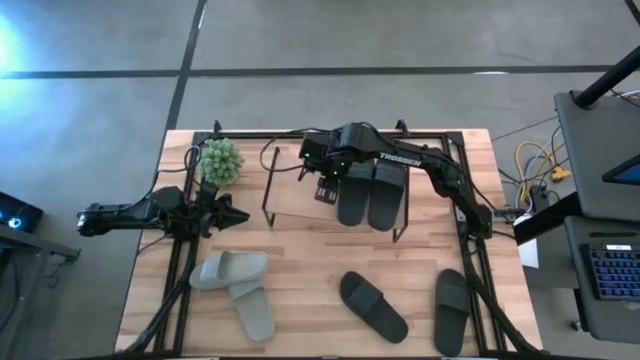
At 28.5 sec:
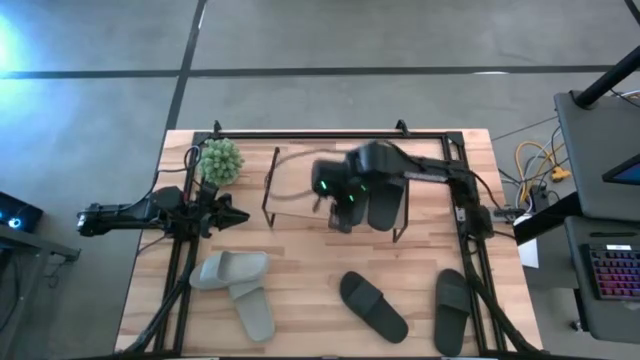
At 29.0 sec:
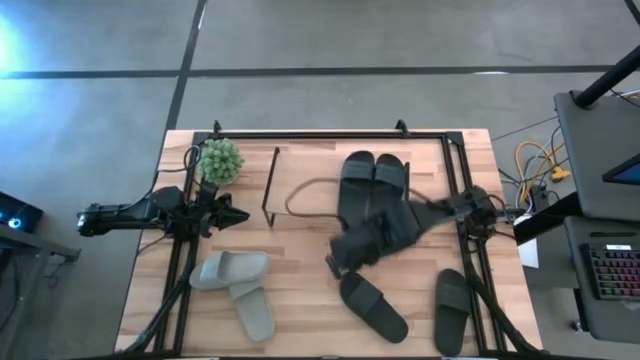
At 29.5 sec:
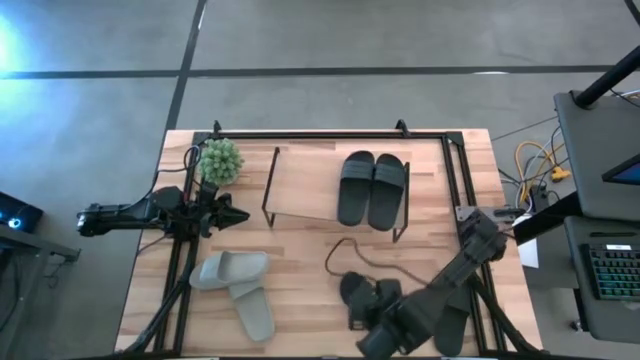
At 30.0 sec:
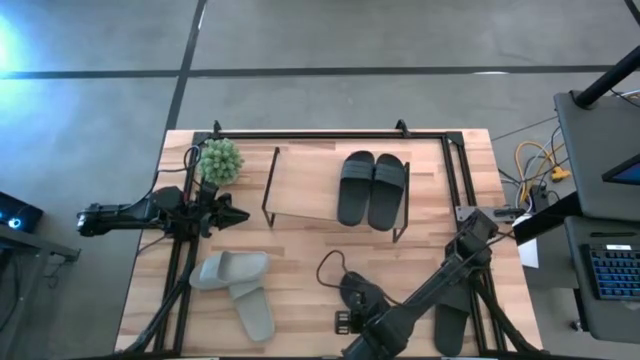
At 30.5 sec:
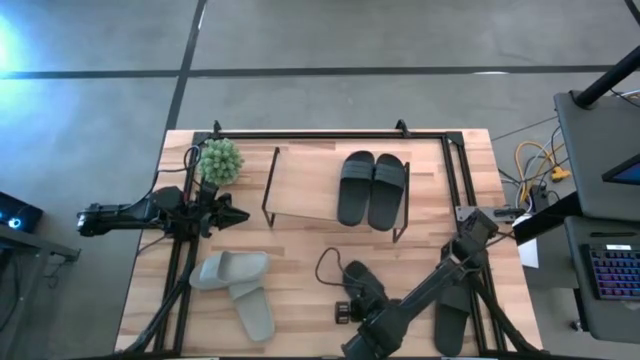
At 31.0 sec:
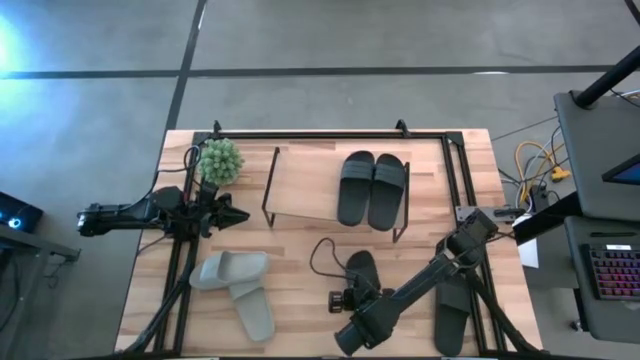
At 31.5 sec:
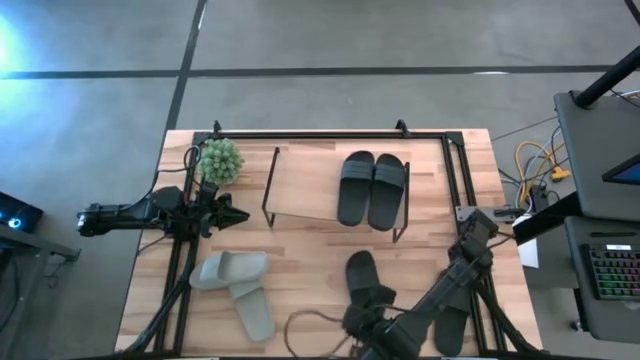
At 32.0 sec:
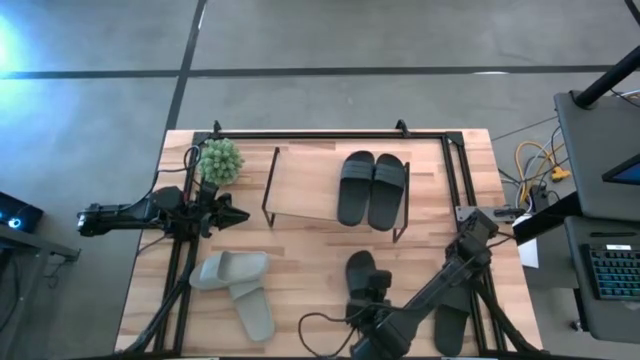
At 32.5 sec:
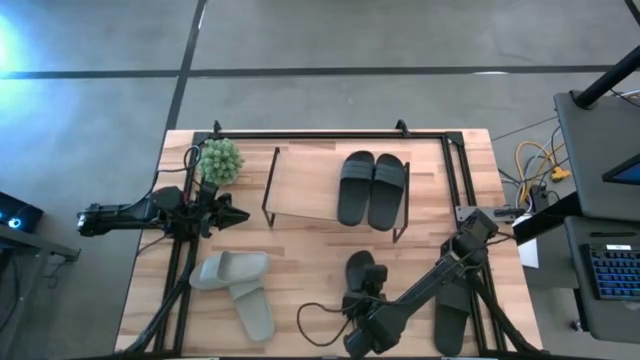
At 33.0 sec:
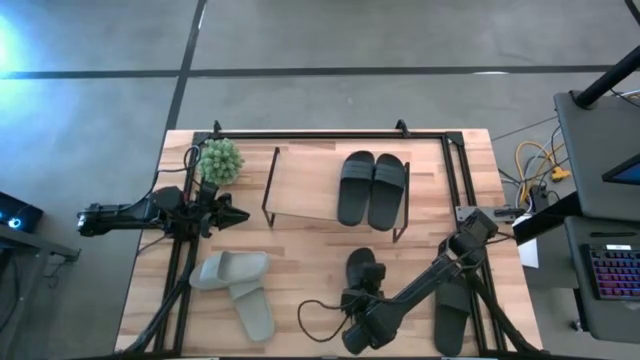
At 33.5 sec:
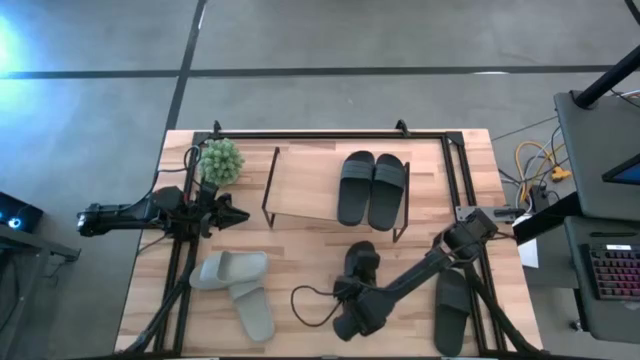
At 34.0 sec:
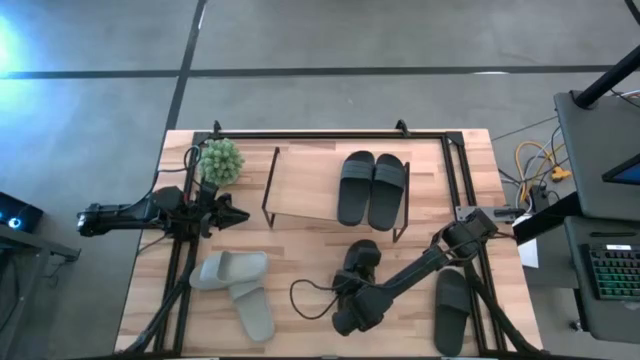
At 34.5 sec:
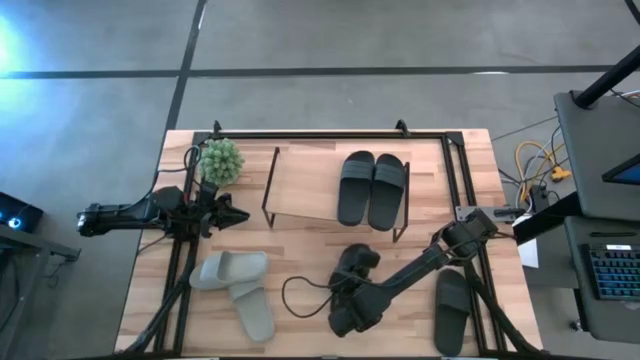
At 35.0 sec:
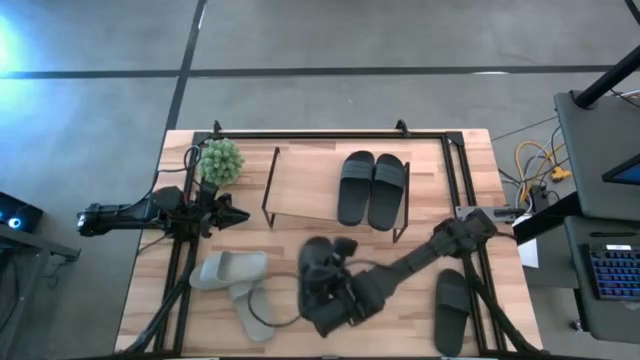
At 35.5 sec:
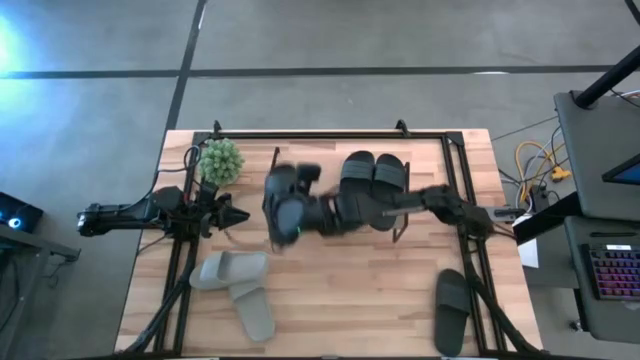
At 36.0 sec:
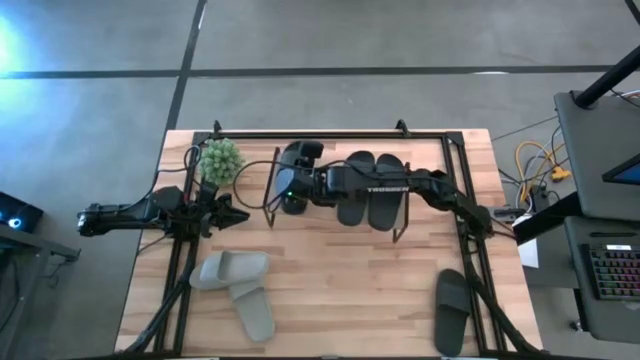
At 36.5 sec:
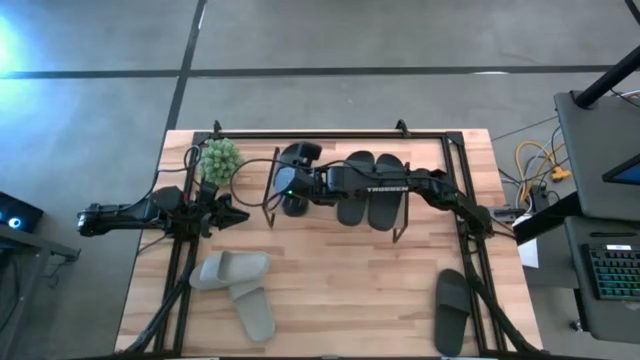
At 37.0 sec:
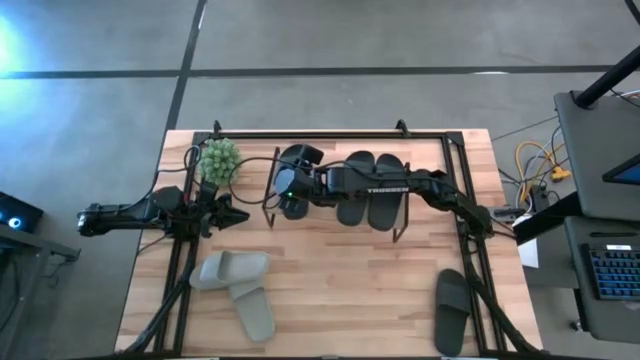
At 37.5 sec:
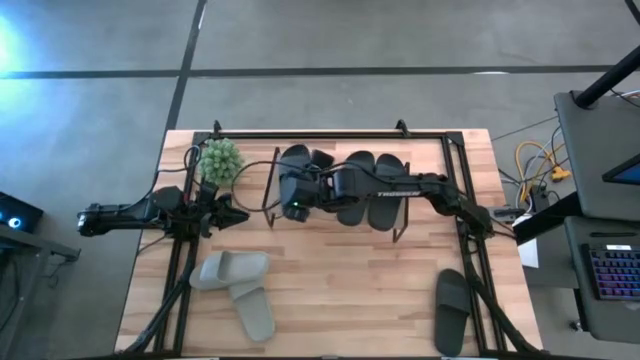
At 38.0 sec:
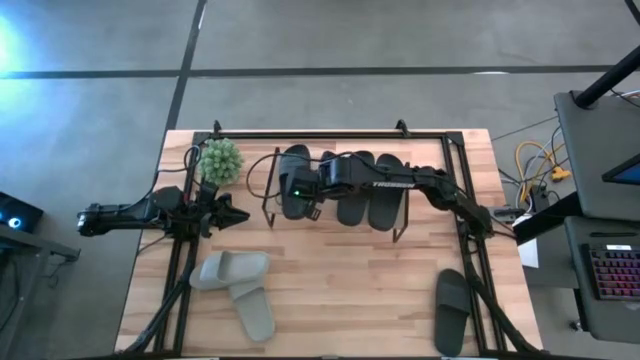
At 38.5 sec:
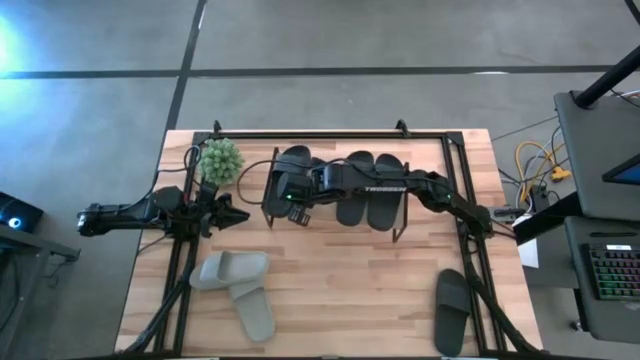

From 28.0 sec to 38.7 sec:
Task: Pick and place slides into the shelf
Put the black slipper on the shelf

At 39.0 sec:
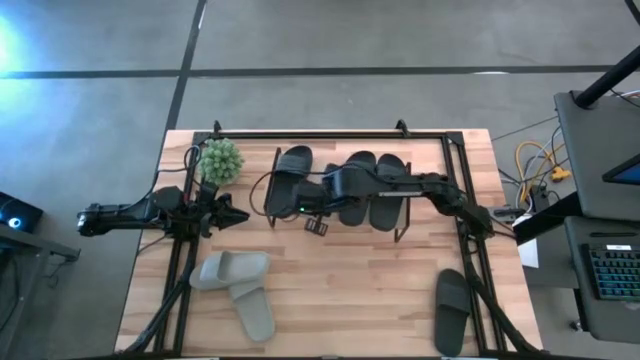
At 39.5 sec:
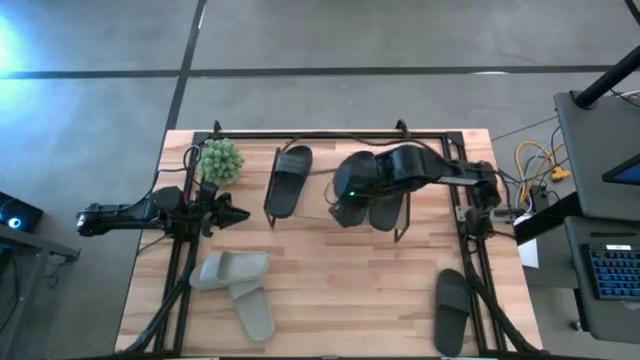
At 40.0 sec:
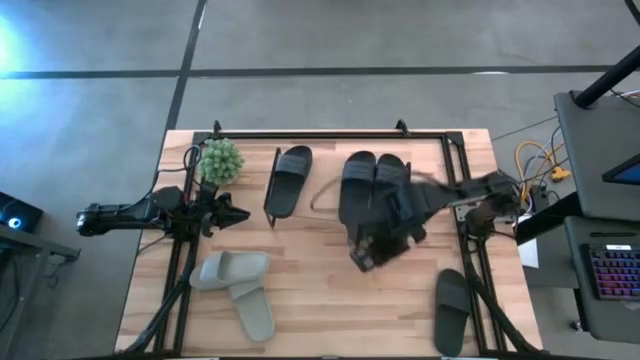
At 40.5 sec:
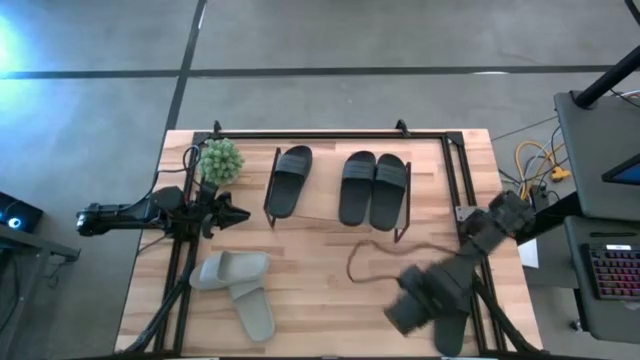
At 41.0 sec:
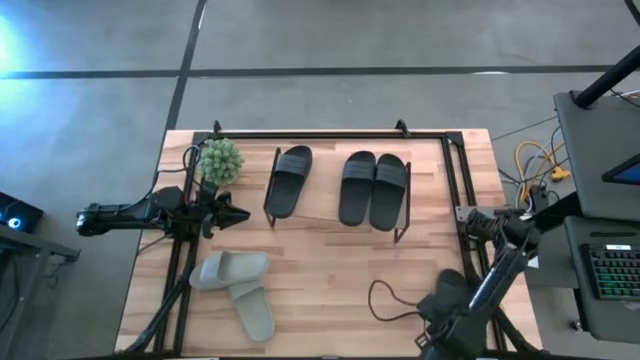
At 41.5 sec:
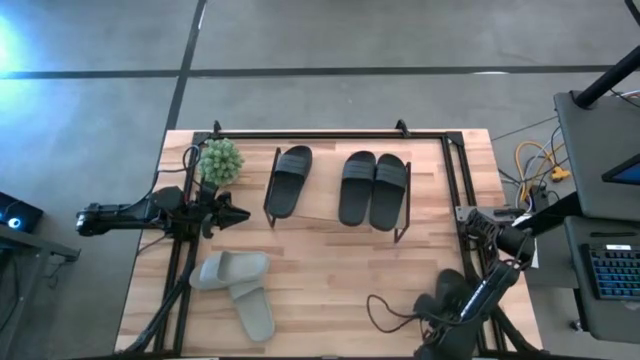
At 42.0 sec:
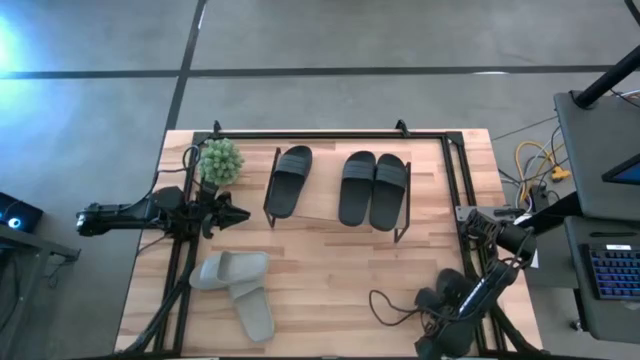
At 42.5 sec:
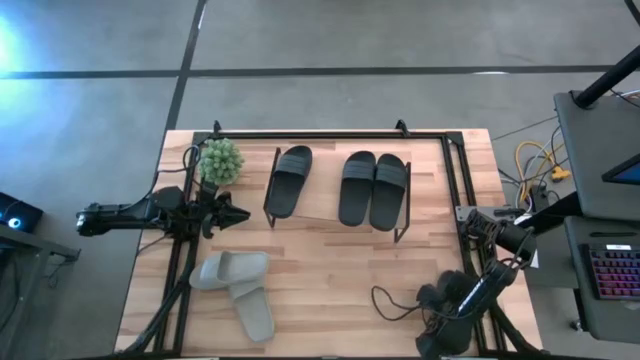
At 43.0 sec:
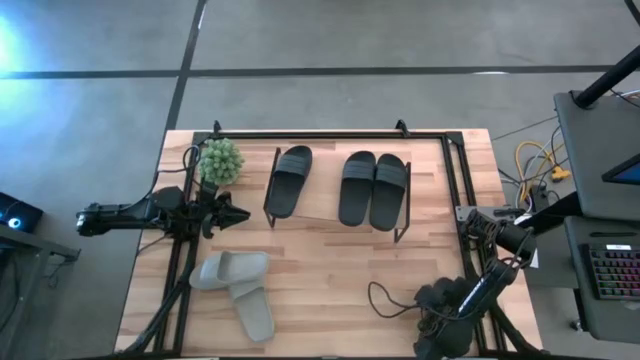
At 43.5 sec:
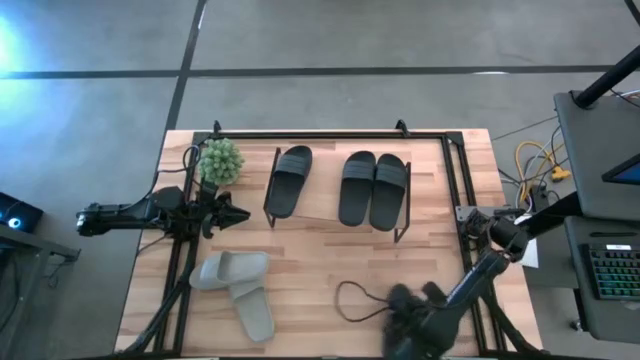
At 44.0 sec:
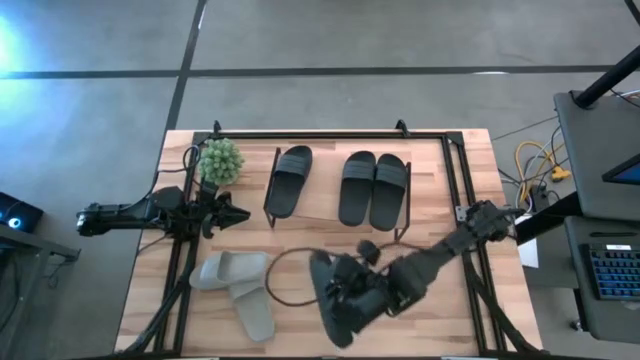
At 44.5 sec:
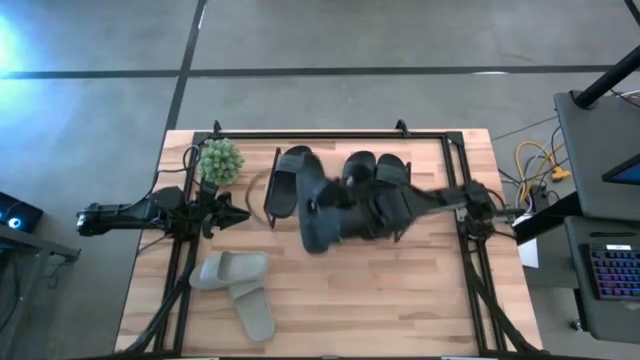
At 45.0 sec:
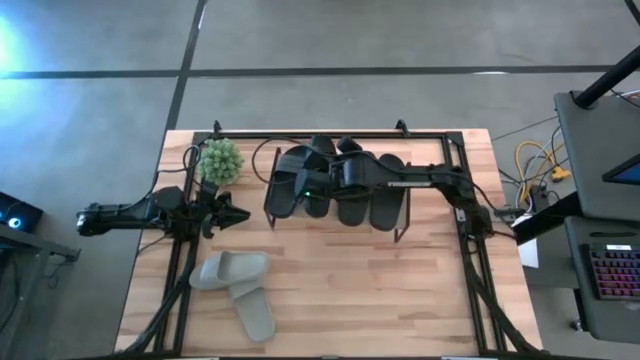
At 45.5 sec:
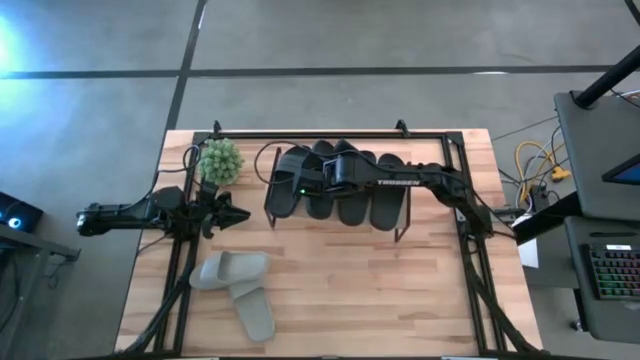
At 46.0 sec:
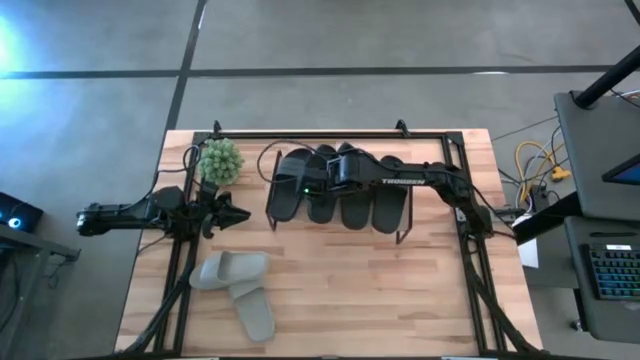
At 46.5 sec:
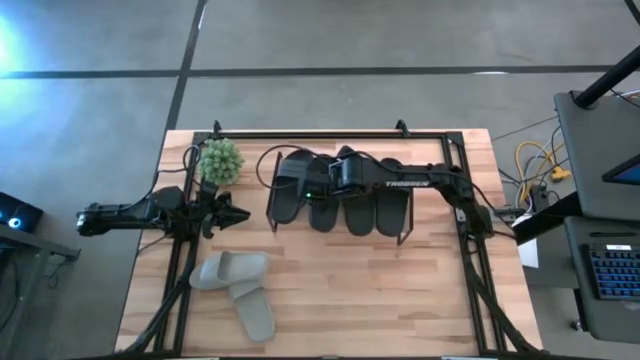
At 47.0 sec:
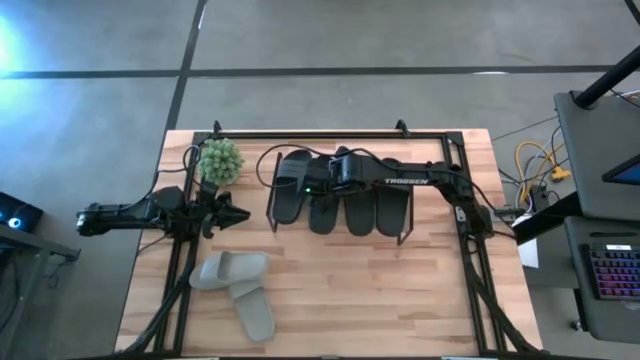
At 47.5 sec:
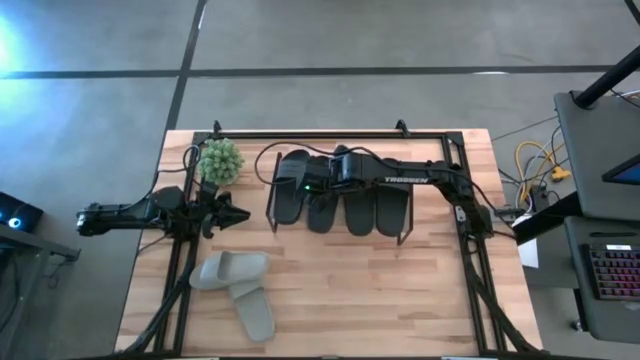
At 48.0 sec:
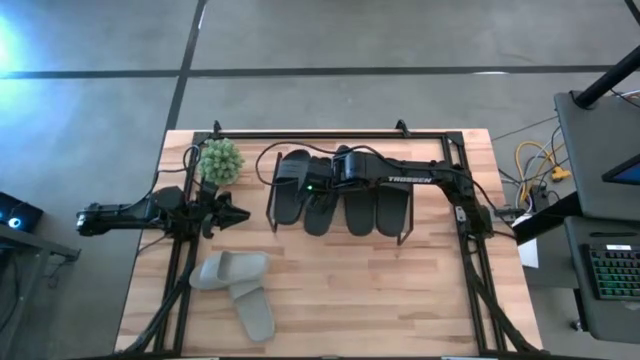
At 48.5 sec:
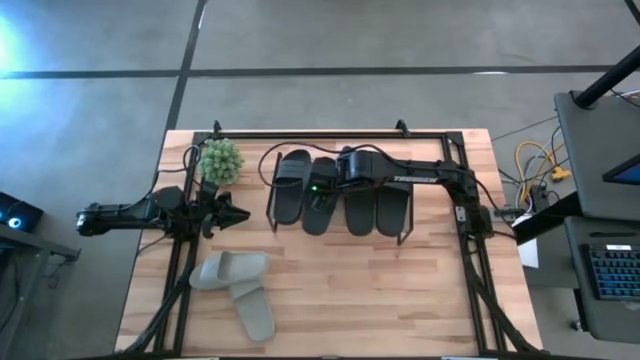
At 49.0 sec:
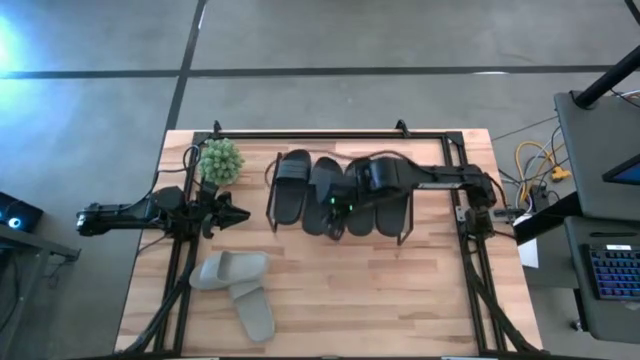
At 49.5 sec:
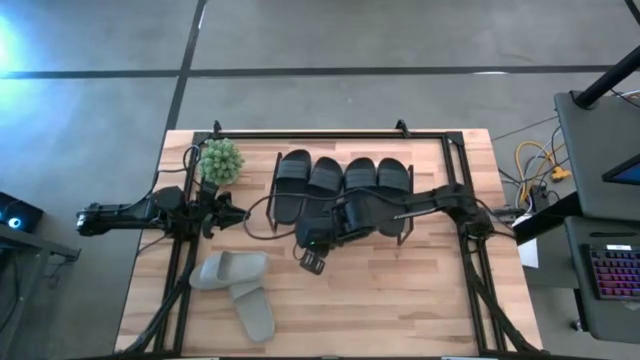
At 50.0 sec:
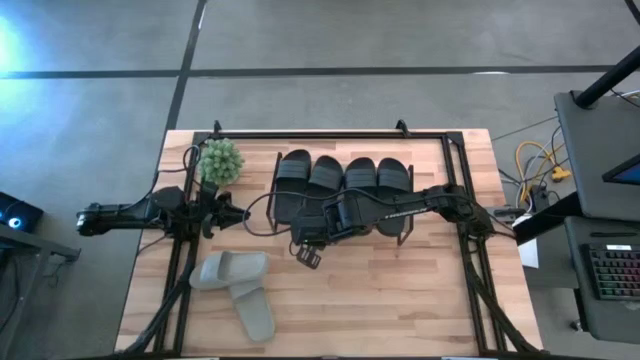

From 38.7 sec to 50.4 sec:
Put the black slipper on the shelf
